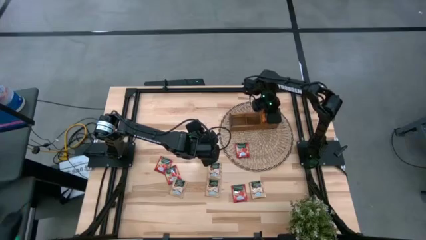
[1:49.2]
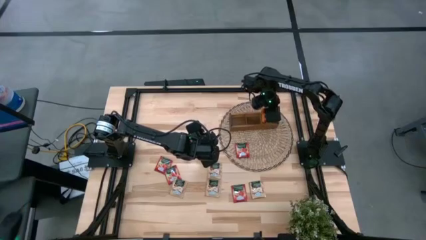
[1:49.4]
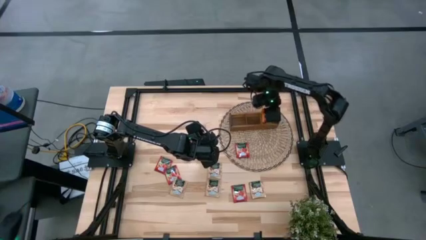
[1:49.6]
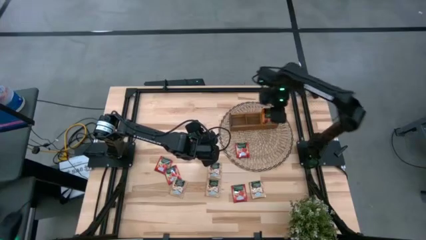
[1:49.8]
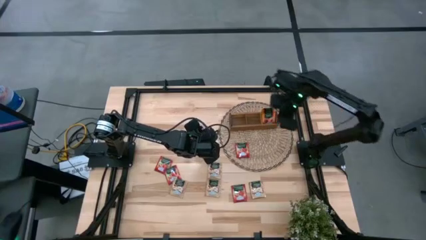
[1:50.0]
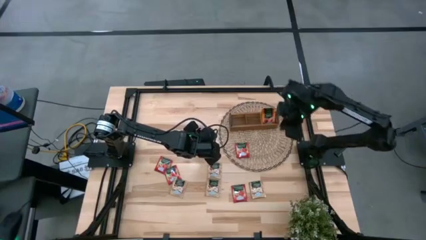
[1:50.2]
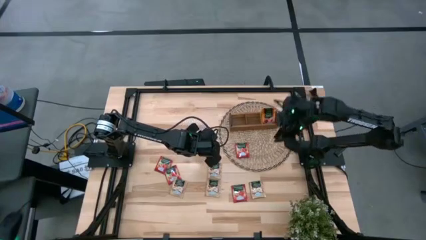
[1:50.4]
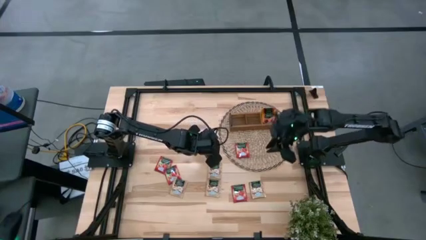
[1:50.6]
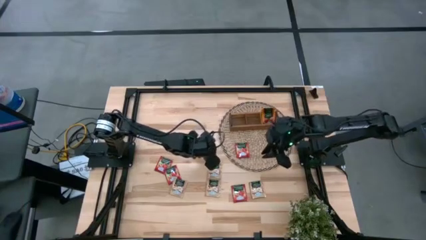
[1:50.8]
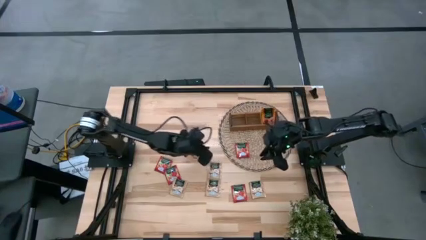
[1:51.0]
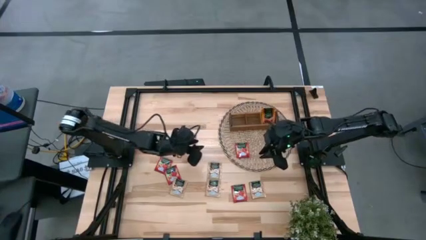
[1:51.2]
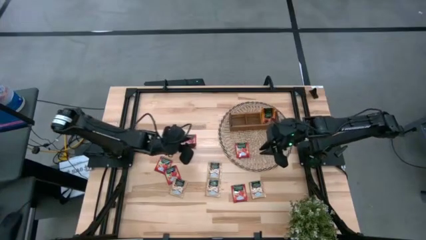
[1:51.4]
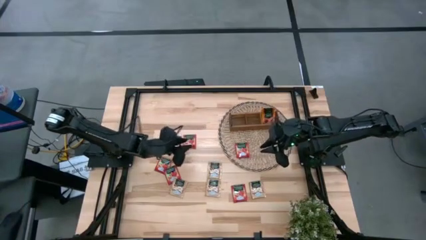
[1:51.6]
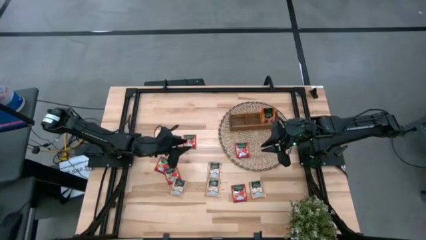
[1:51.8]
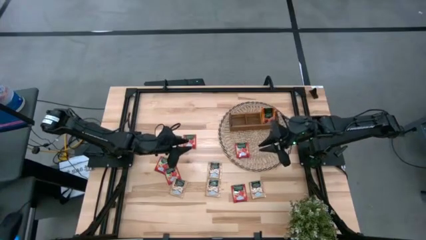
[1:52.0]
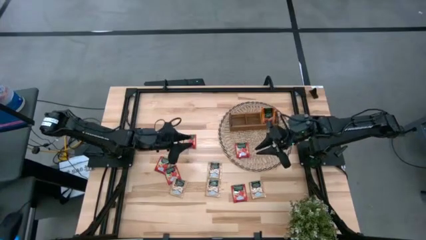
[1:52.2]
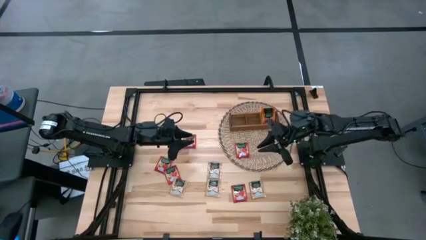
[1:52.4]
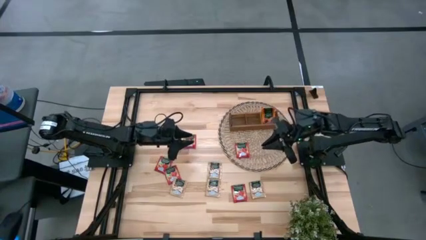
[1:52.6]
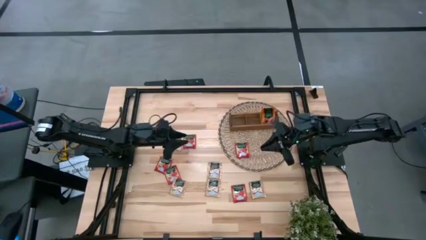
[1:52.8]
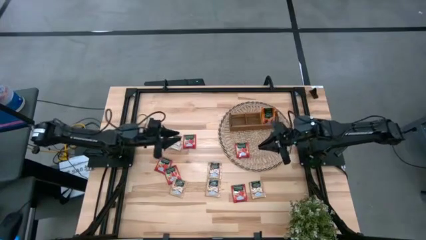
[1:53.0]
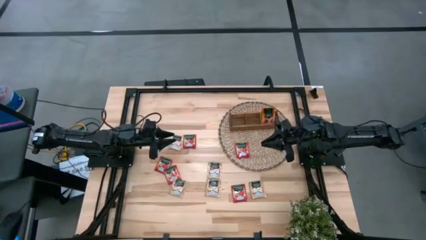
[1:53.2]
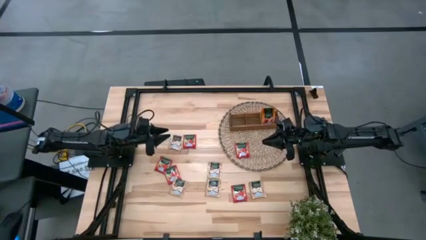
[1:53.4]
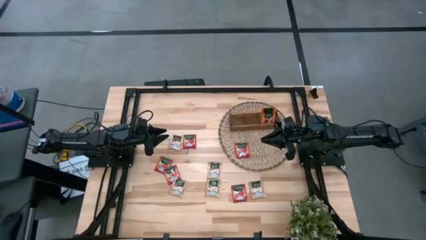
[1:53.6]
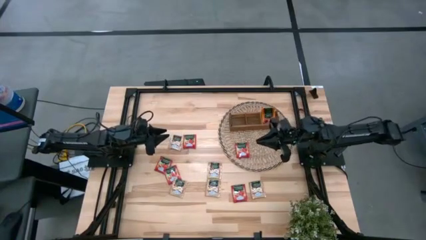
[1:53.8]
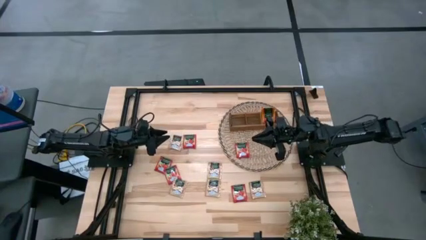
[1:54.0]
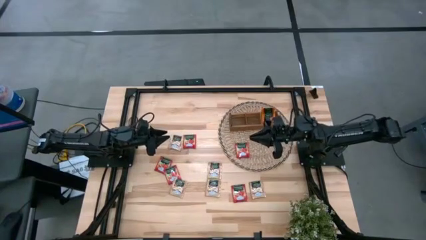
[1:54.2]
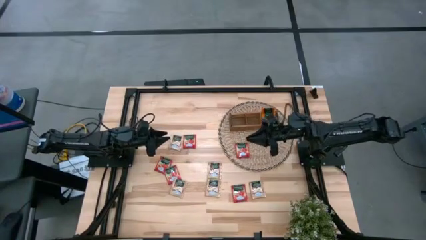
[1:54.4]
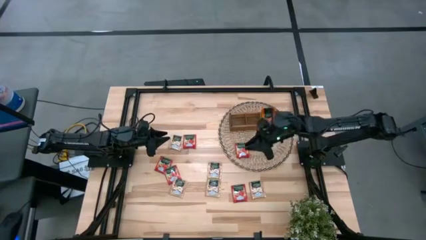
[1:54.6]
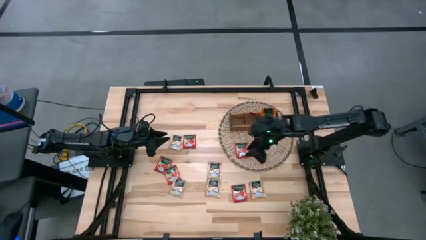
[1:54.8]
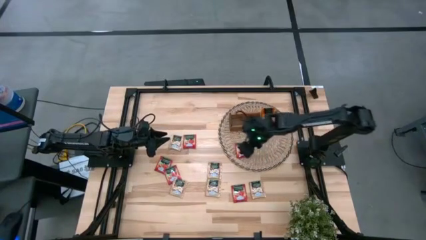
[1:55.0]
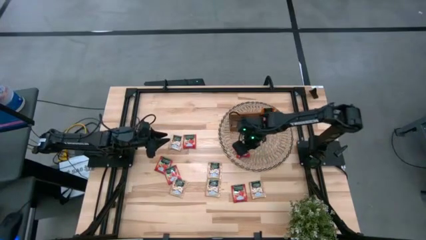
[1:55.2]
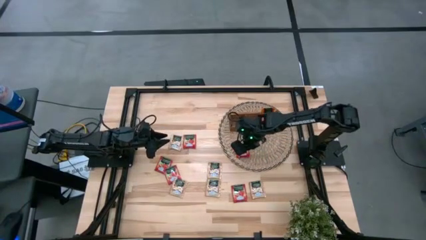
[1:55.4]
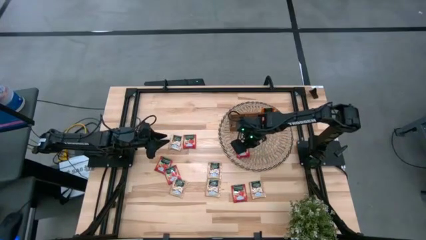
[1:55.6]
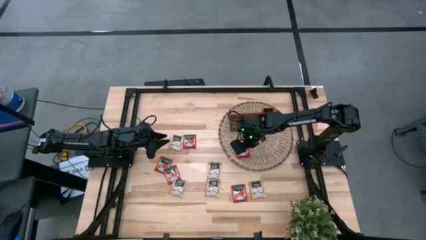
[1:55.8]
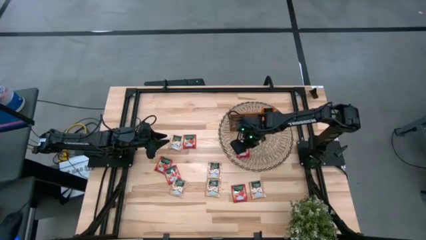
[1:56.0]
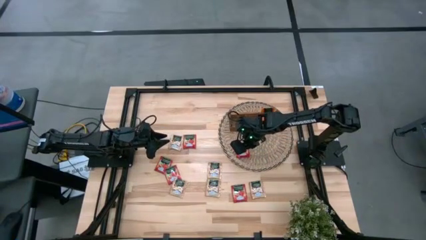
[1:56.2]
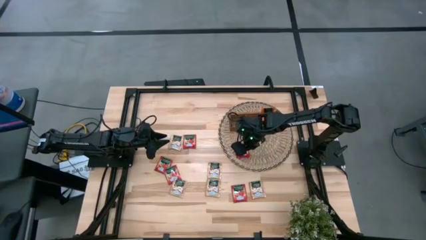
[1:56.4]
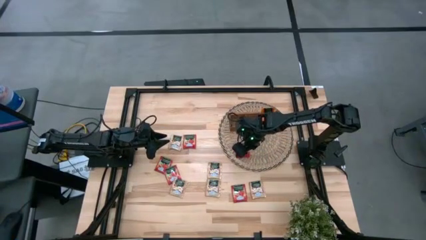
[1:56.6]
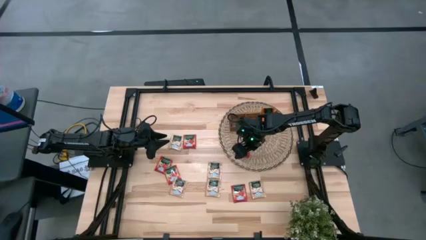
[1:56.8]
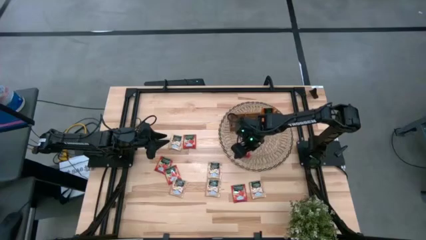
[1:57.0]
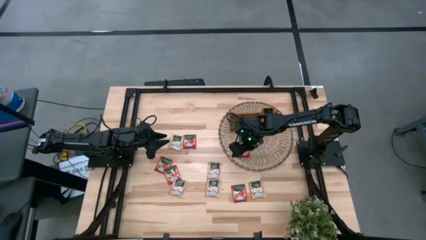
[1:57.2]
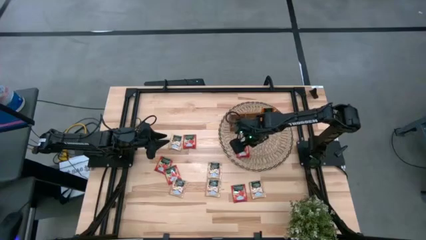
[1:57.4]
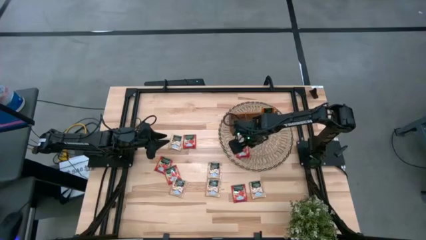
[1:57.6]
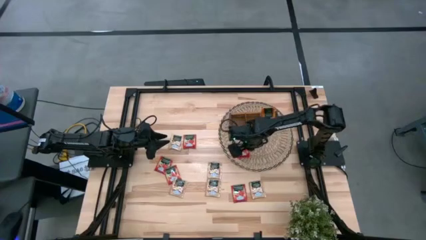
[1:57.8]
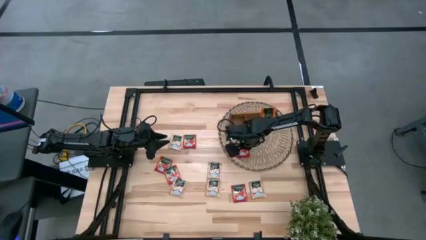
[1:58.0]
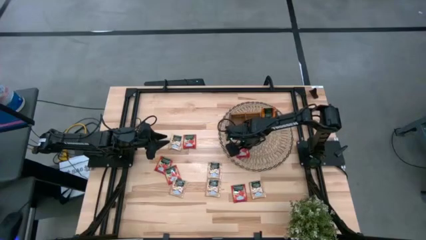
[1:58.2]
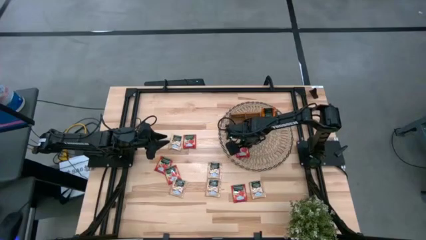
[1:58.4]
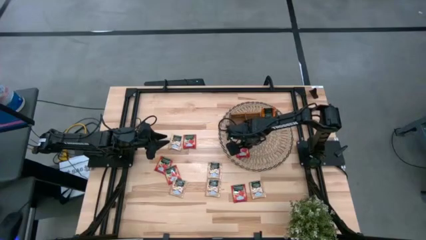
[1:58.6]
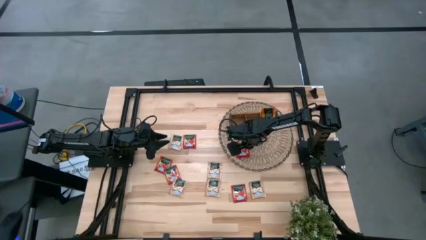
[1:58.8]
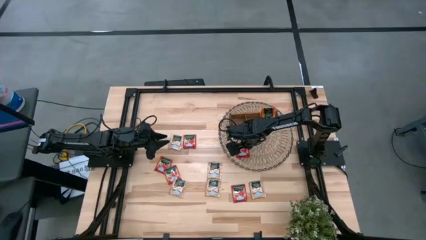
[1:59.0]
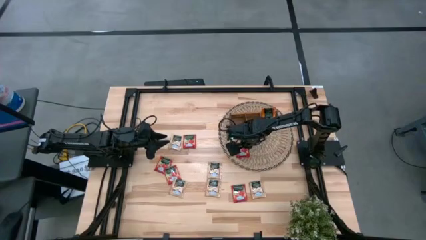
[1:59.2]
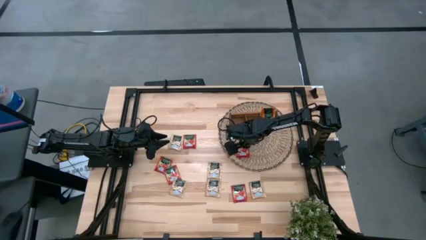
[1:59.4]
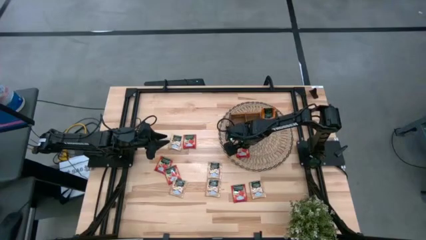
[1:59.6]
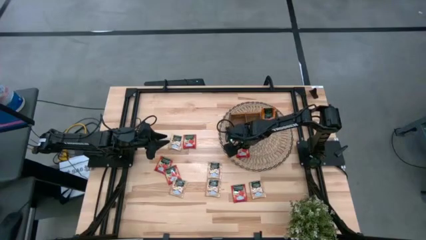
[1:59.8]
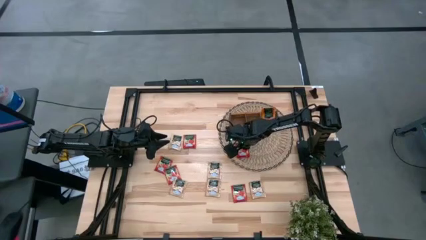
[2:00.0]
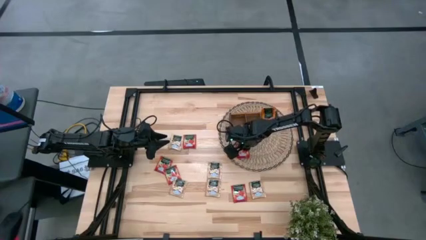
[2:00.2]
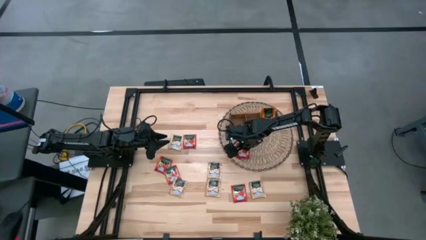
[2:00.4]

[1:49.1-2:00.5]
Task: Pick & Place Tea
Put the red tea pack into the middle compartment of the brown organizer
